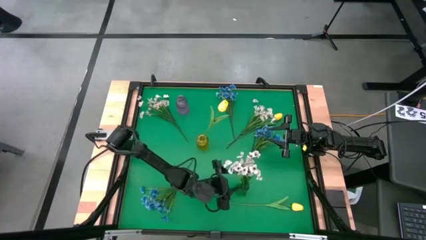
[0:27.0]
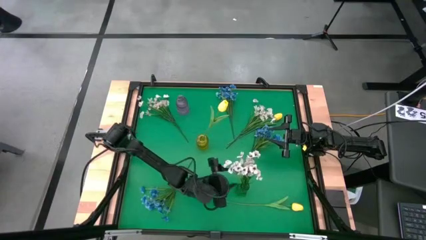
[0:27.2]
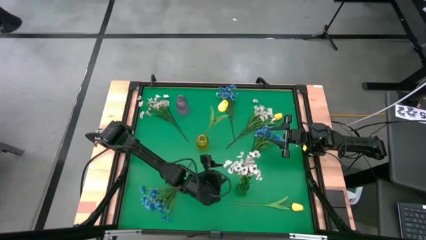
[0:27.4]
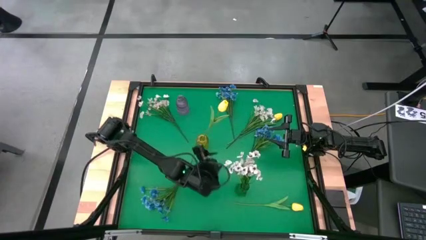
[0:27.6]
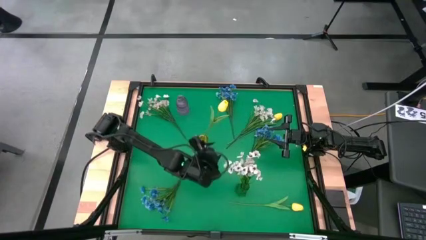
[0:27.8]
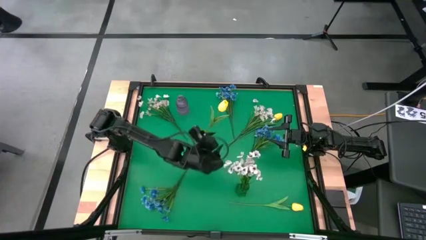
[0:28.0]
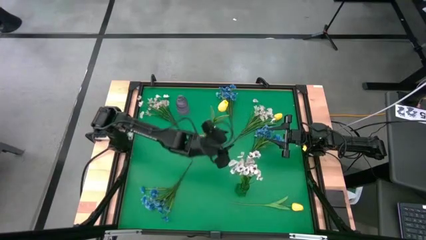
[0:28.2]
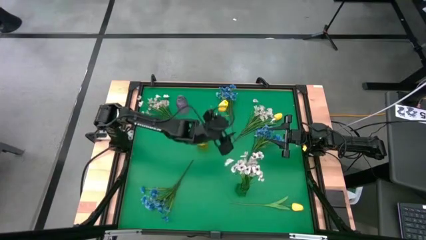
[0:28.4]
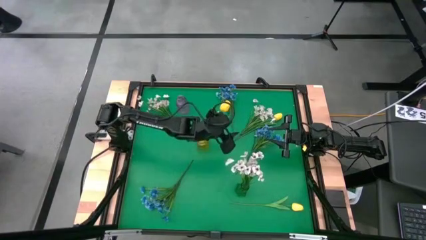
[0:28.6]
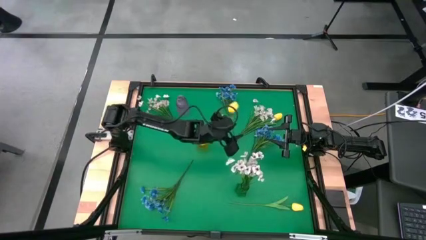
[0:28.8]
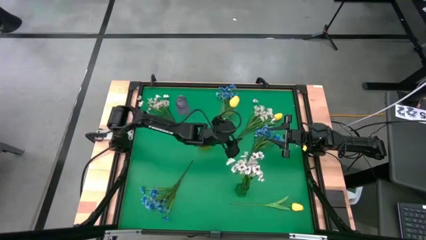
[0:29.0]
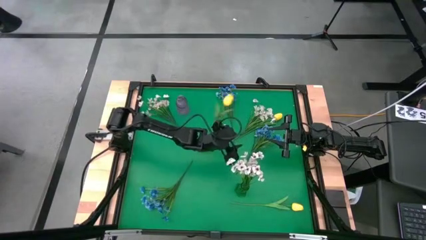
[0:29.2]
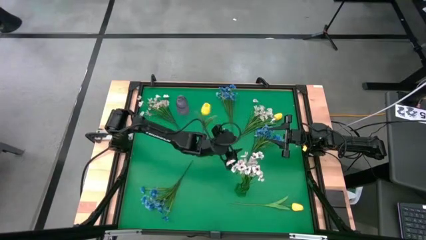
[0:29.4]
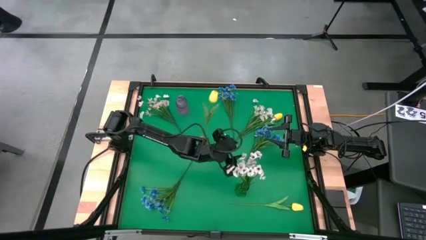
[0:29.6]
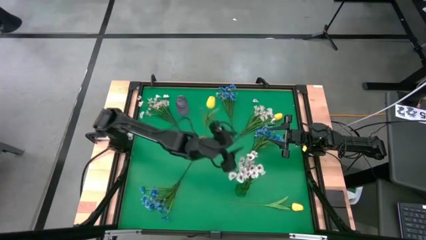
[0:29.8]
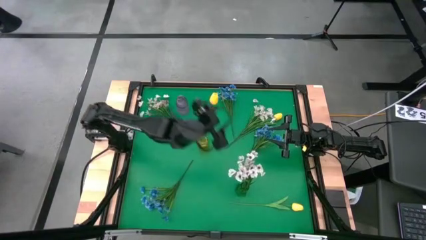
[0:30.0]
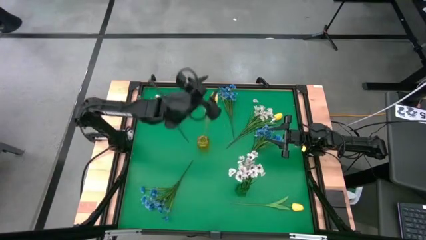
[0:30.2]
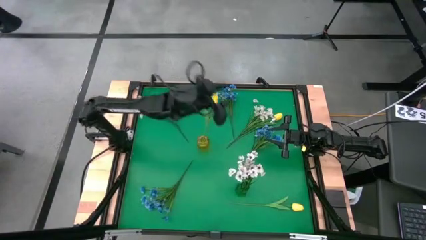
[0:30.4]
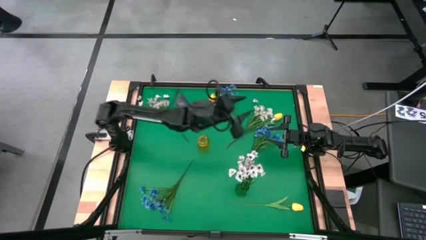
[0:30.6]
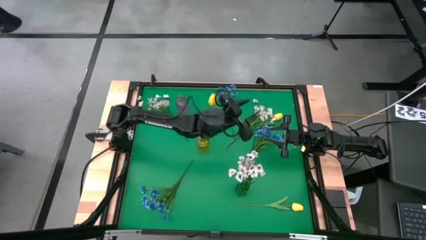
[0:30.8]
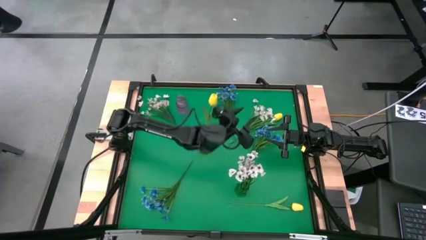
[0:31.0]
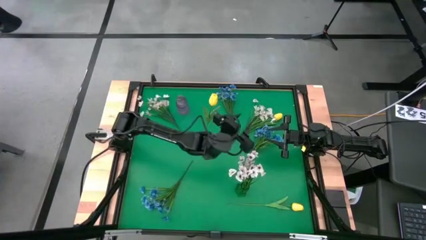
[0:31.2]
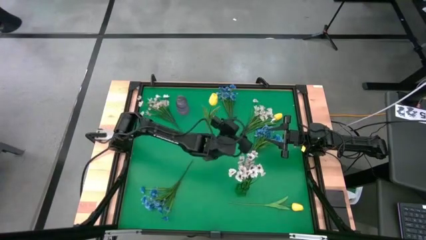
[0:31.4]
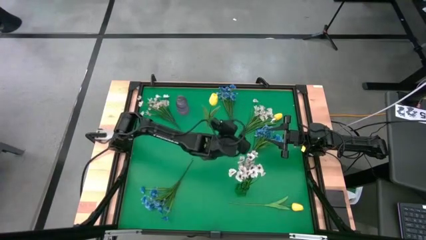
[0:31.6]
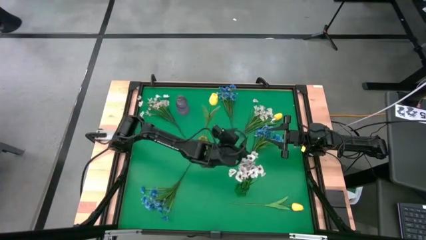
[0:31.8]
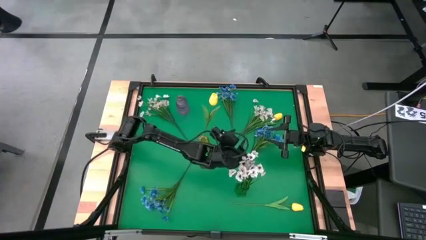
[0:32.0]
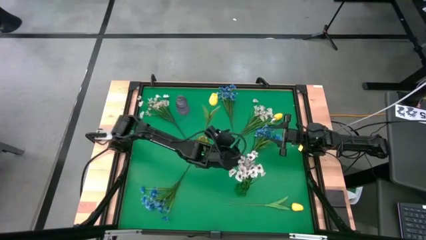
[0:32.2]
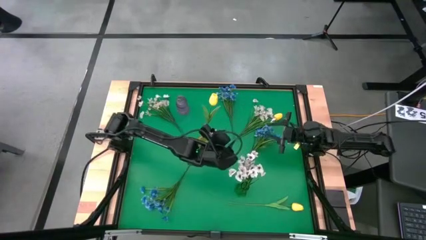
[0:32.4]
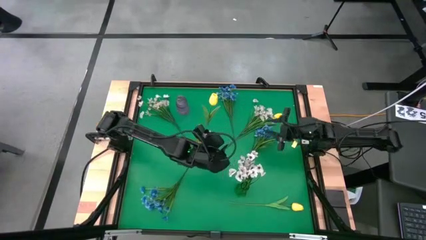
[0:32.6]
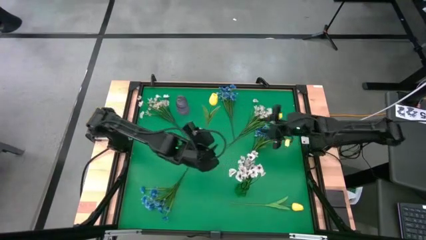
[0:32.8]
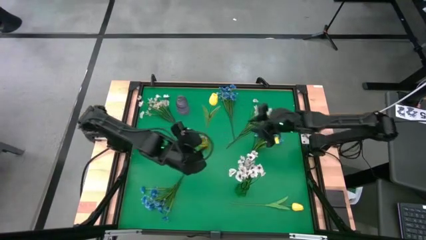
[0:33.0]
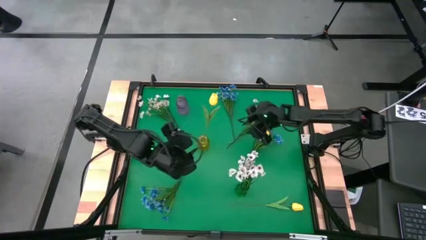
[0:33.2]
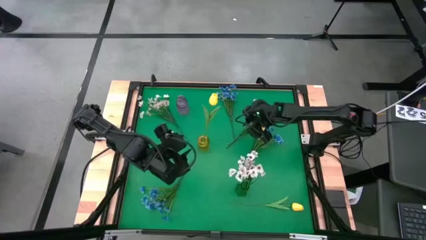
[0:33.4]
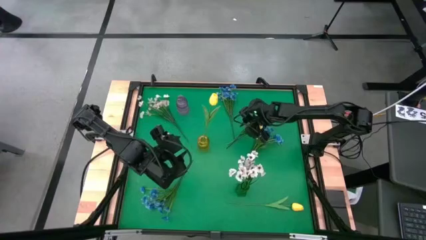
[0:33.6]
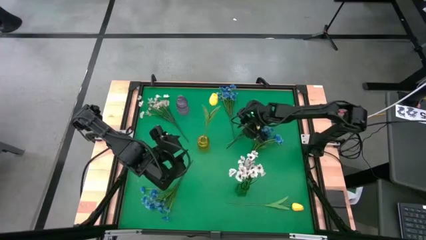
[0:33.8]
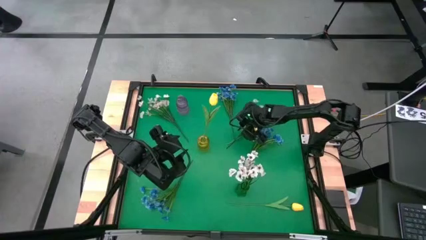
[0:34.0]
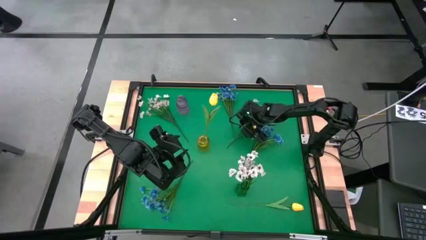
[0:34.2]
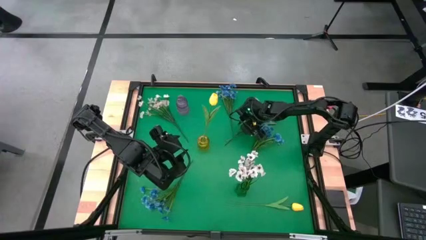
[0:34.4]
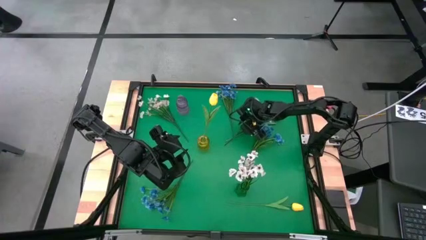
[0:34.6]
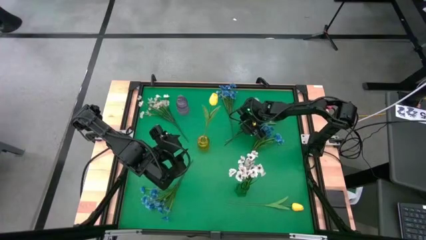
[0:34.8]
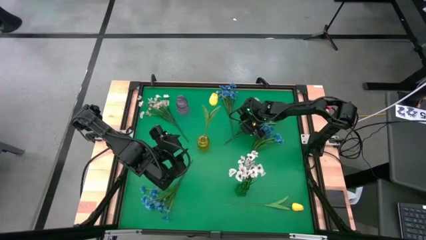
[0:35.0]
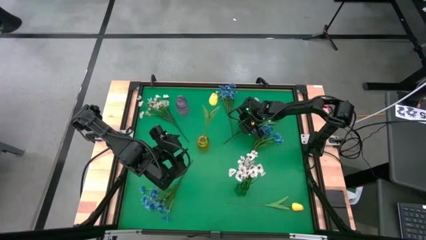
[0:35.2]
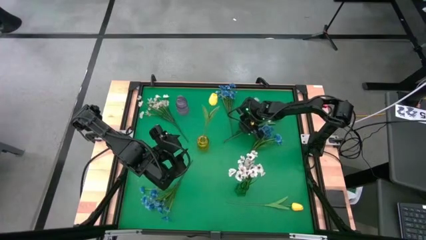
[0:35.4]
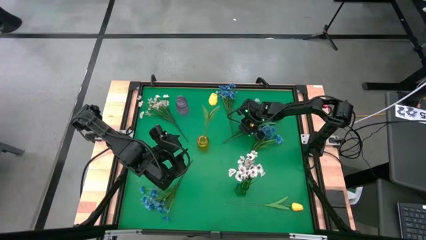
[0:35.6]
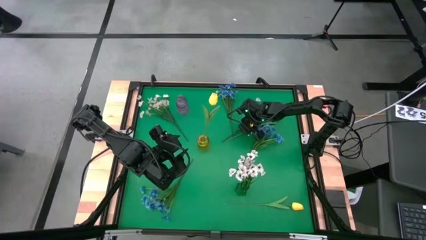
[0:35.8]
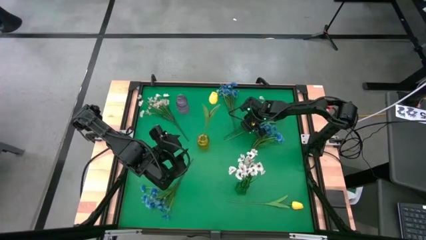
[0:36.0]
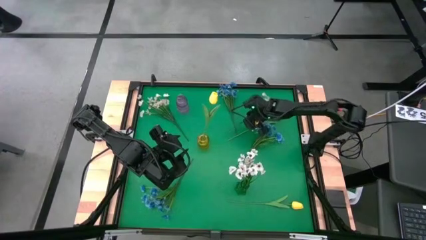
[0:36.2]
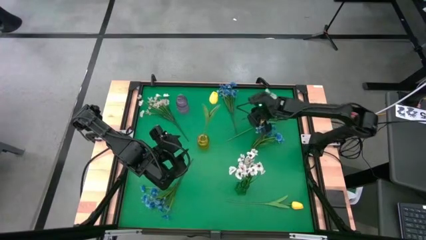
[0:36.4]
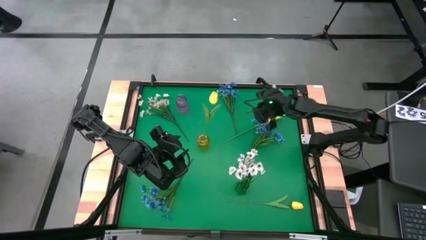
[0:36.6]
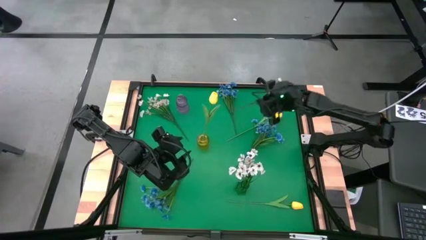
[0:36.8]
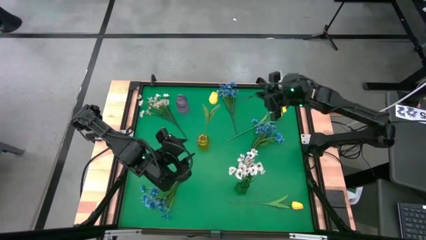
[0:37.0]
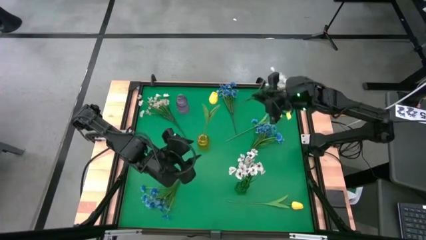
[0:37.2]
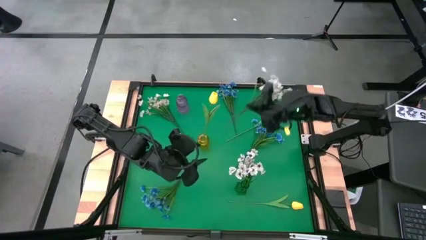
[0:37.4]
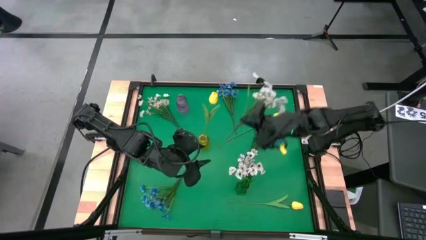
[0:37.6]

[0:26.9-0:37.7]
Task: Sort flowers into vase by color
Put the right white flowers into the green vase

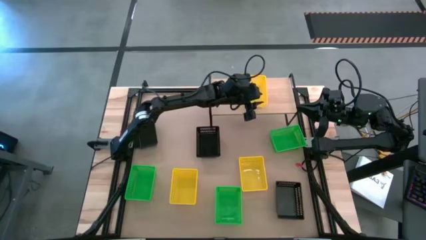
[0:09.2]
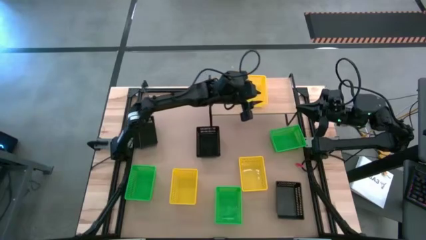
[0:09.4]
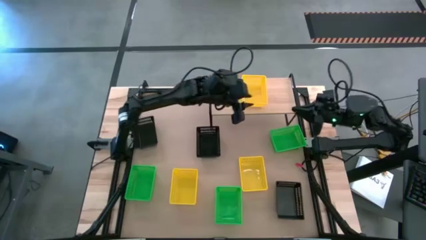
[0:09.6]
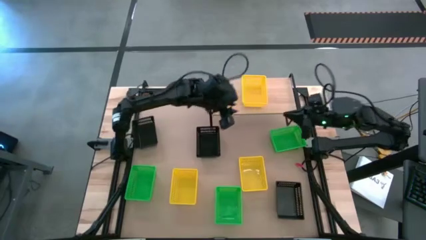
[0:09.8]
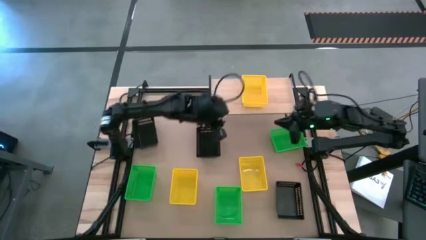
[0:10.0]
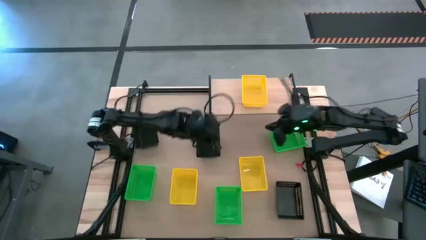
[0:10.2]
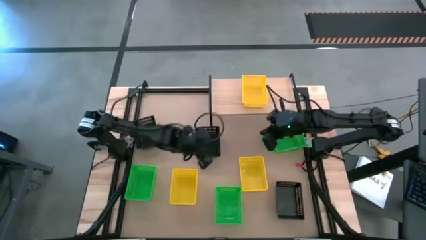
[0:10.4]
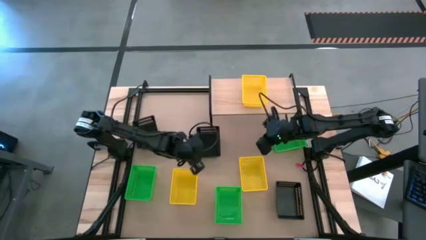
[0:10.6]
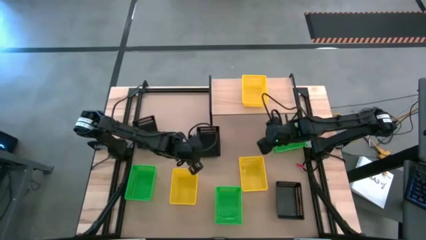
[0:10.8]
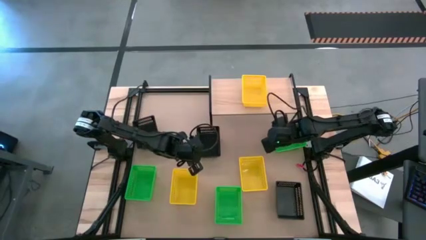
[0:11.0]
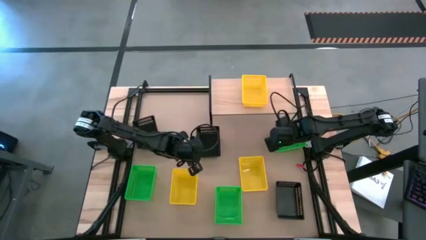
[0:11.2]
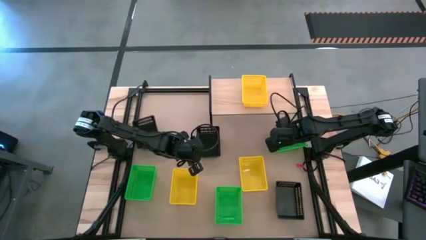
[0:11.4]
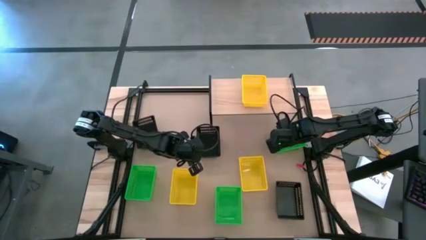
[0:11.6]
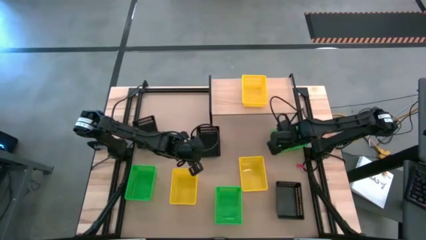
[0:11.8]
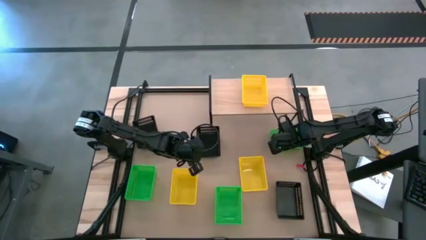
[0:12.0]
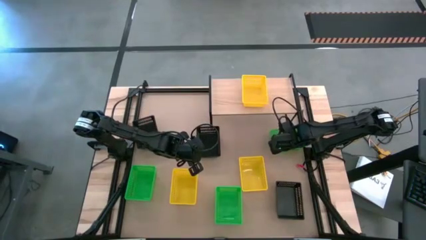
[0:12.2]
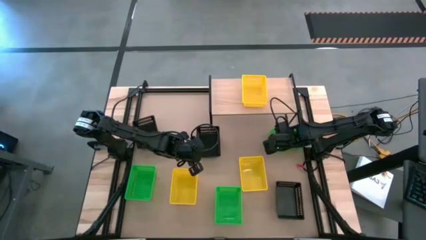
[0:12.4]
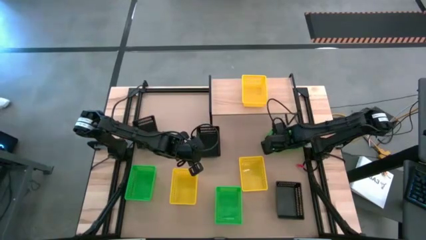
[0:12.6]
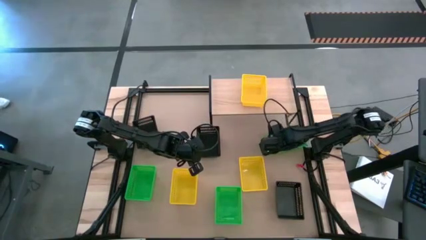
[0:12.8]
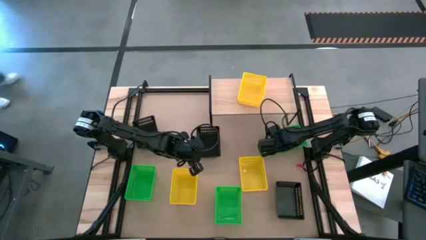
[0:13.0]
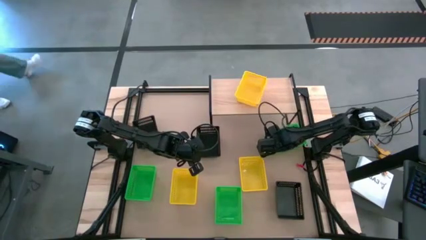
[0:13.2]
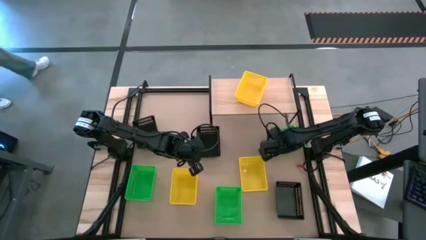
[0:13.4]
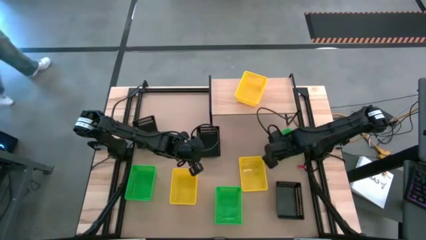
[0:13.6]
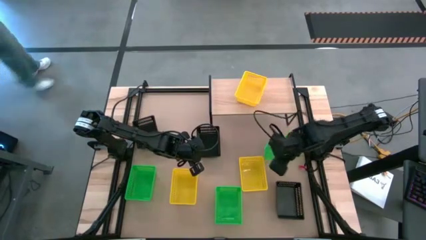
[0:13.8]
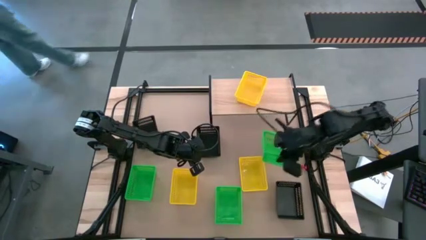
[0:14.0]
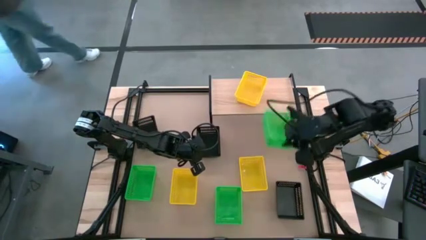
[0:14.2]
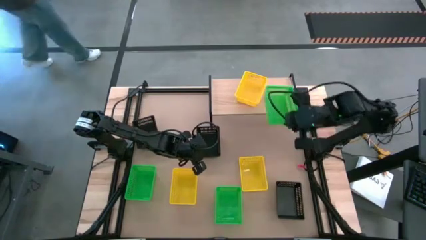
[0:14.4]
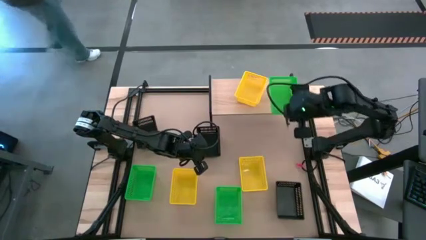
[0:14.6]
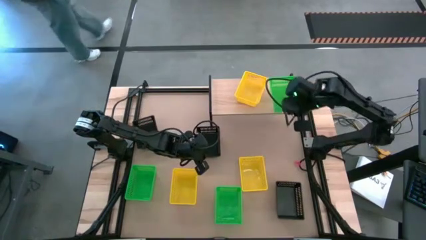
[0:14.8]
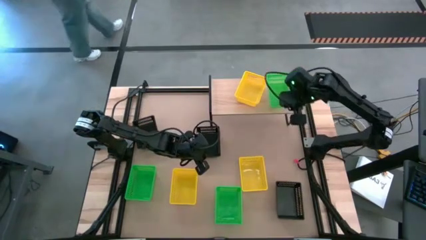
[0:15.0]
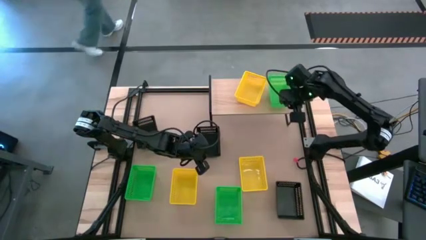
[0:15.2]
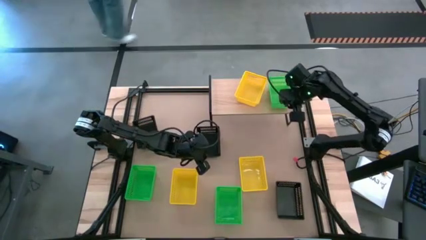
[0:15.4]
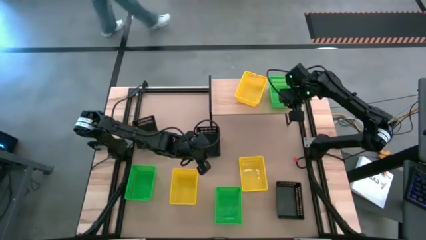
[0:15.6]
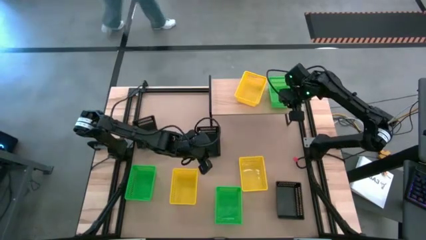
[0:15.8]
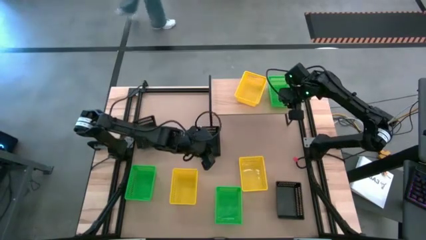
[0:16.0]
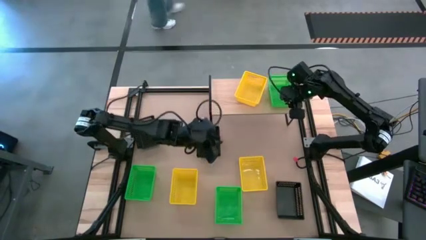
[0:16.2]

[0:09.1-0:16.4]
Task: Stack baskets on shelf by color
Put the top green bin on the shelf
